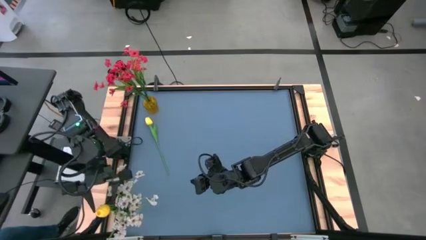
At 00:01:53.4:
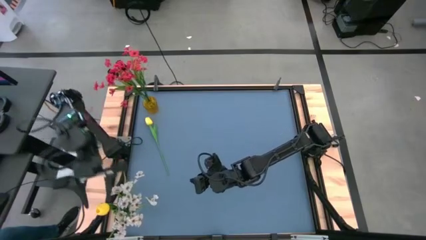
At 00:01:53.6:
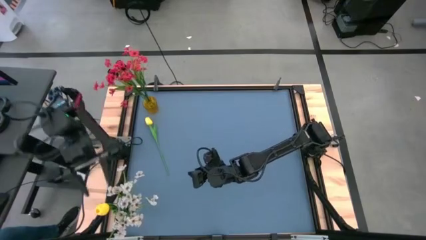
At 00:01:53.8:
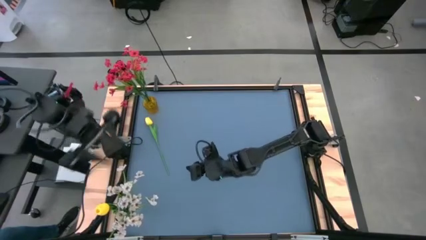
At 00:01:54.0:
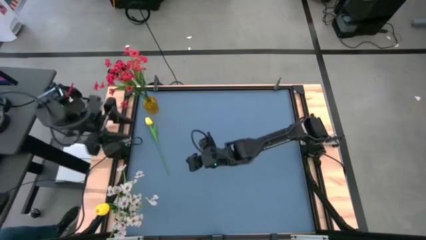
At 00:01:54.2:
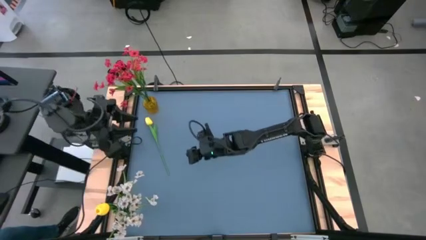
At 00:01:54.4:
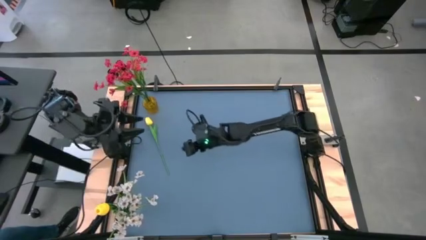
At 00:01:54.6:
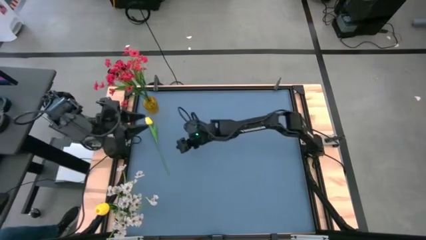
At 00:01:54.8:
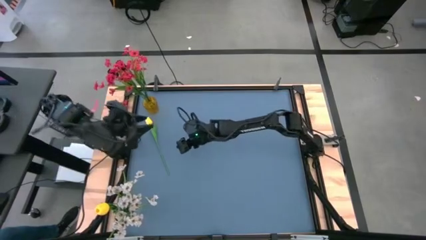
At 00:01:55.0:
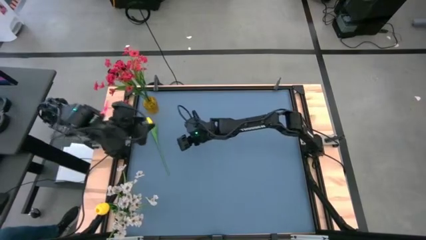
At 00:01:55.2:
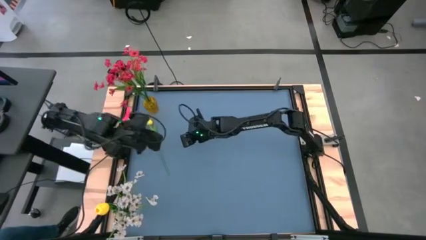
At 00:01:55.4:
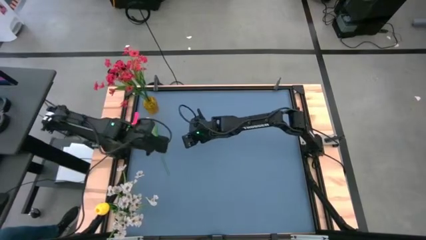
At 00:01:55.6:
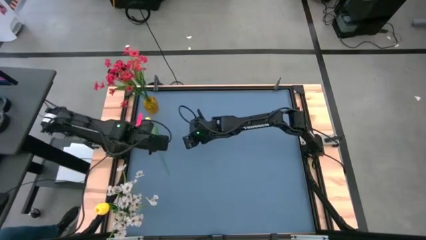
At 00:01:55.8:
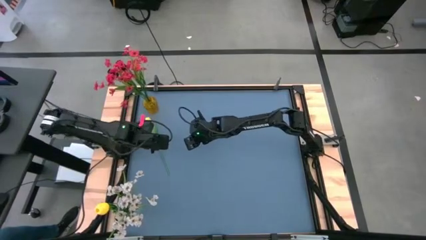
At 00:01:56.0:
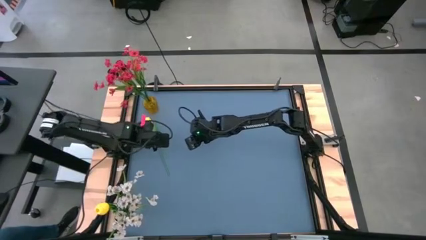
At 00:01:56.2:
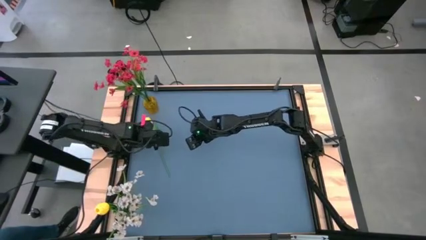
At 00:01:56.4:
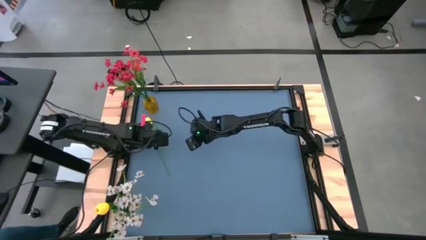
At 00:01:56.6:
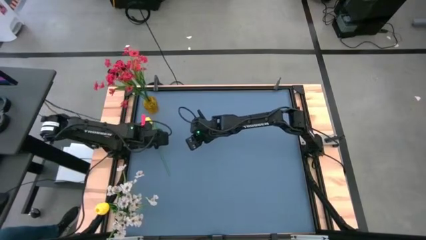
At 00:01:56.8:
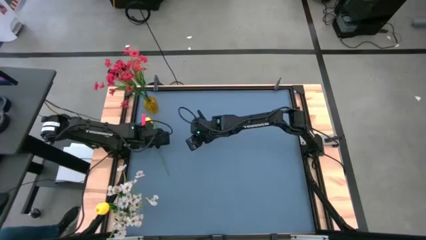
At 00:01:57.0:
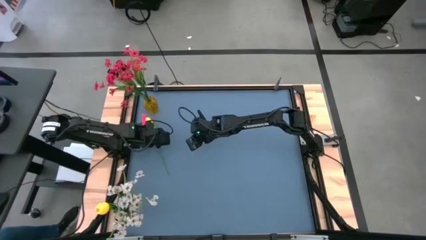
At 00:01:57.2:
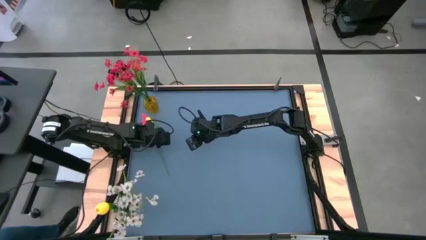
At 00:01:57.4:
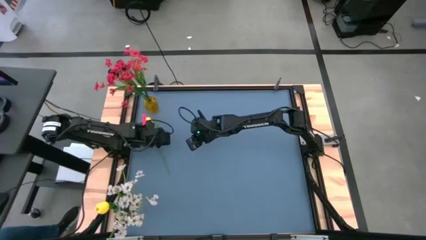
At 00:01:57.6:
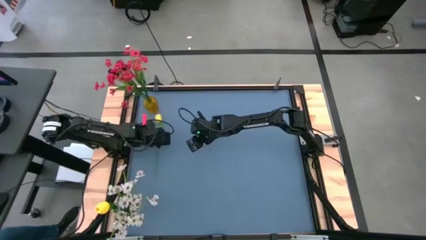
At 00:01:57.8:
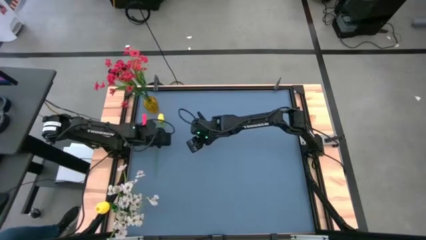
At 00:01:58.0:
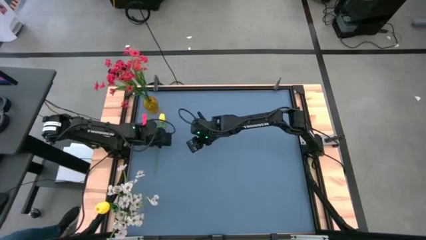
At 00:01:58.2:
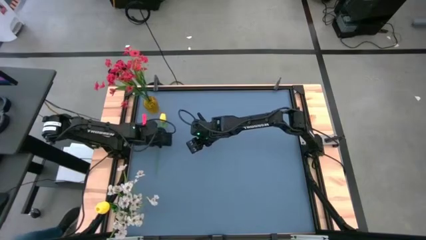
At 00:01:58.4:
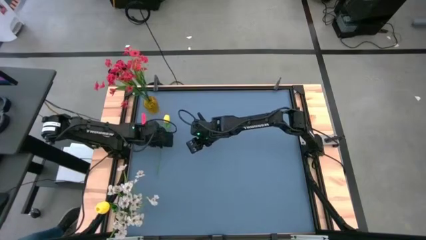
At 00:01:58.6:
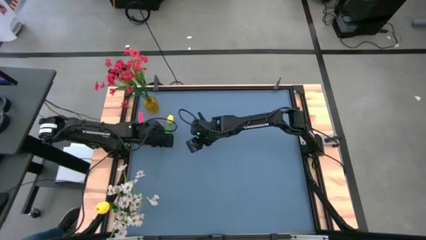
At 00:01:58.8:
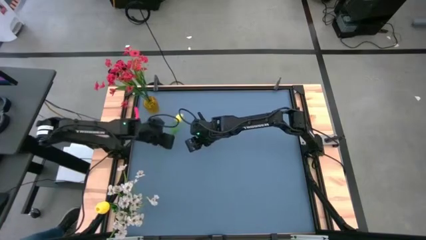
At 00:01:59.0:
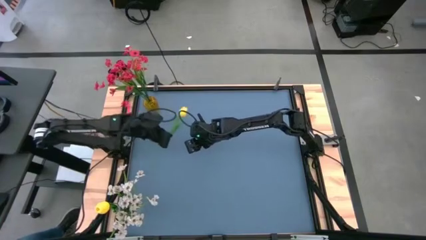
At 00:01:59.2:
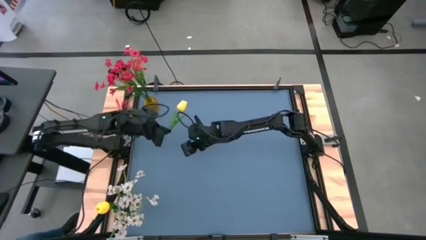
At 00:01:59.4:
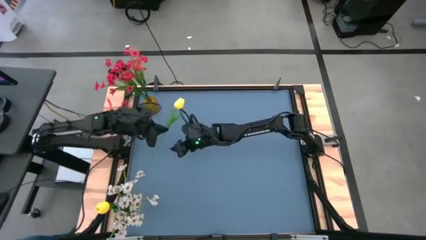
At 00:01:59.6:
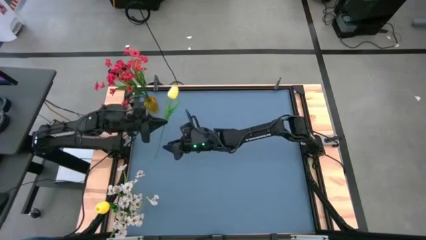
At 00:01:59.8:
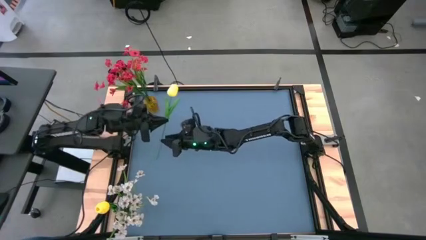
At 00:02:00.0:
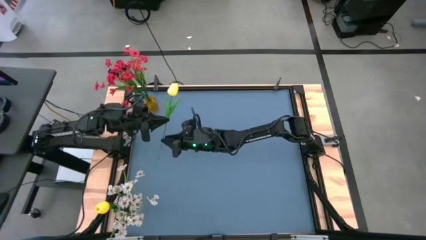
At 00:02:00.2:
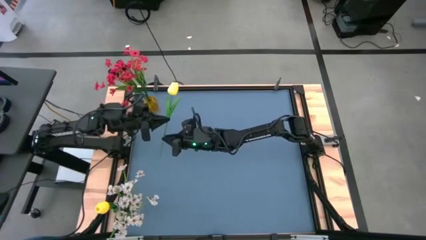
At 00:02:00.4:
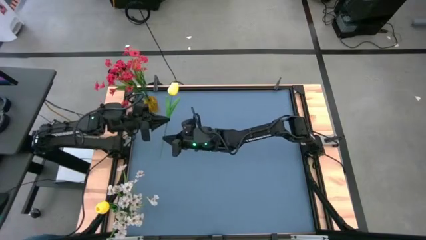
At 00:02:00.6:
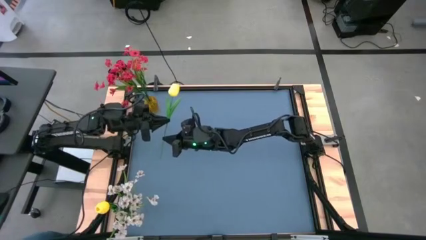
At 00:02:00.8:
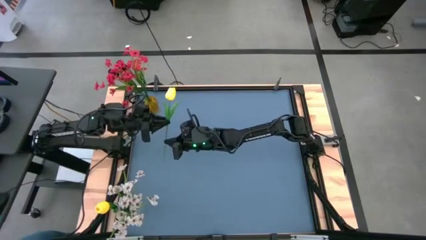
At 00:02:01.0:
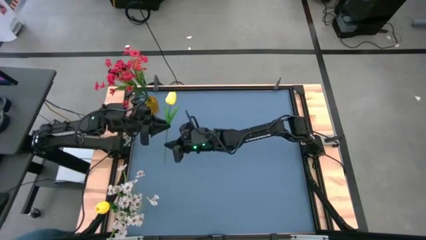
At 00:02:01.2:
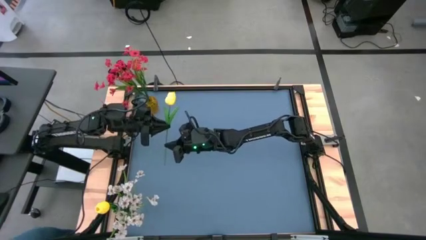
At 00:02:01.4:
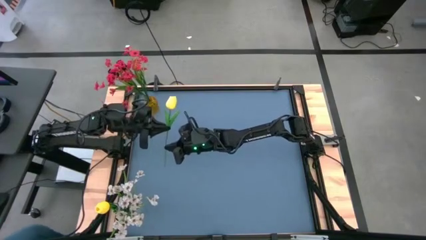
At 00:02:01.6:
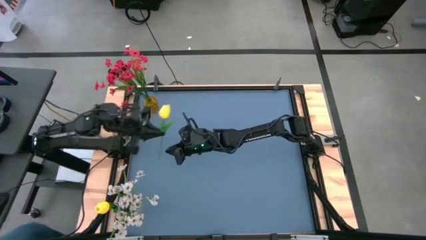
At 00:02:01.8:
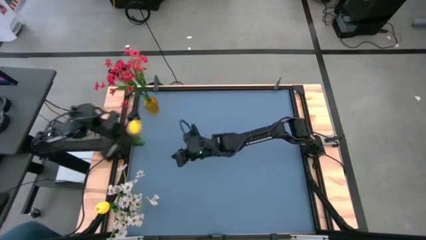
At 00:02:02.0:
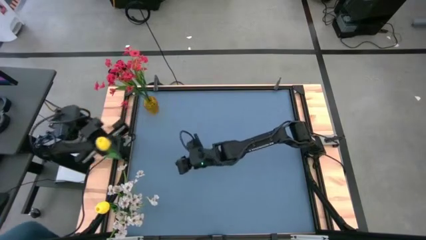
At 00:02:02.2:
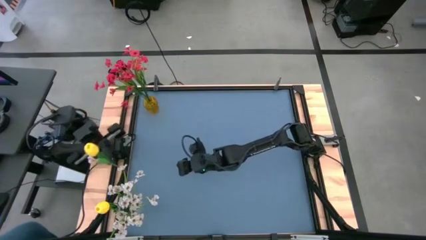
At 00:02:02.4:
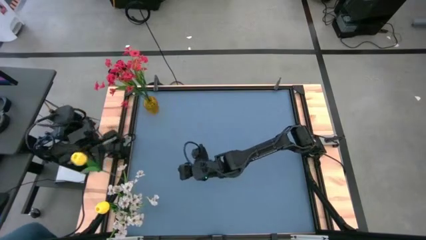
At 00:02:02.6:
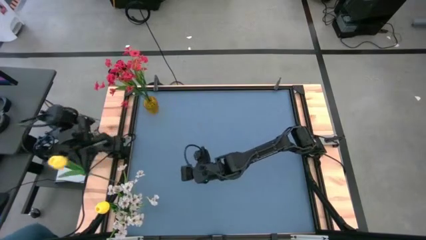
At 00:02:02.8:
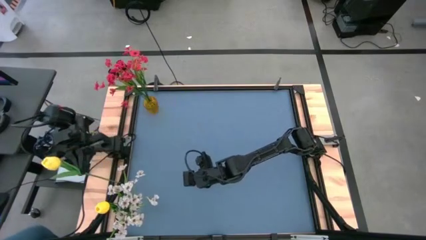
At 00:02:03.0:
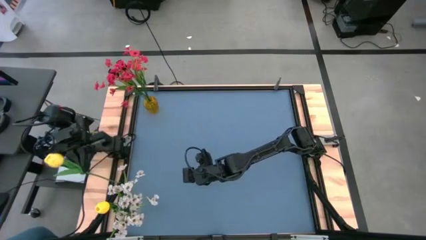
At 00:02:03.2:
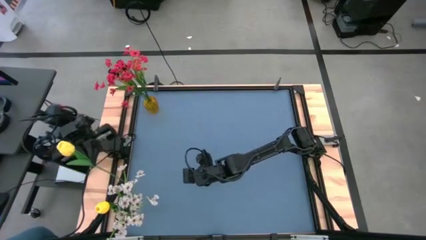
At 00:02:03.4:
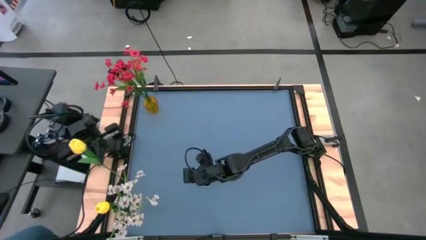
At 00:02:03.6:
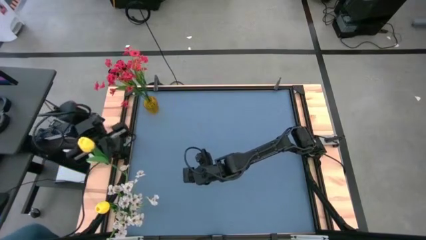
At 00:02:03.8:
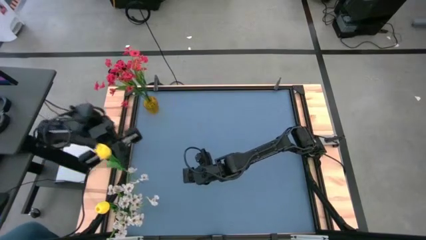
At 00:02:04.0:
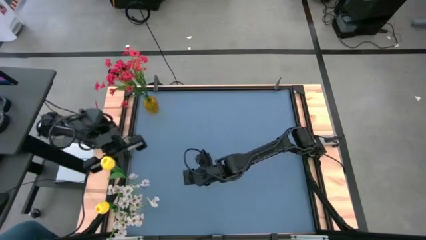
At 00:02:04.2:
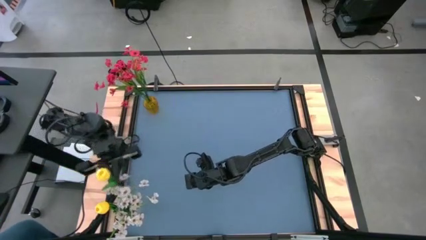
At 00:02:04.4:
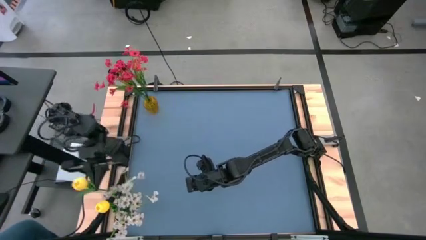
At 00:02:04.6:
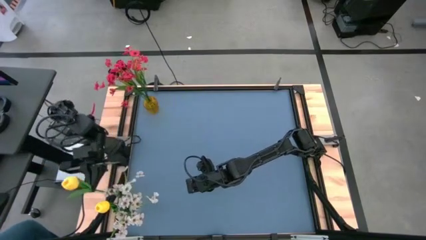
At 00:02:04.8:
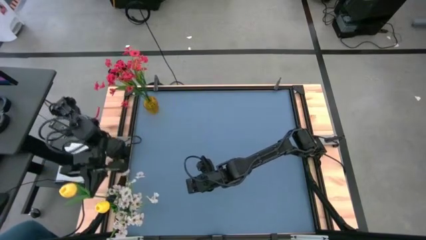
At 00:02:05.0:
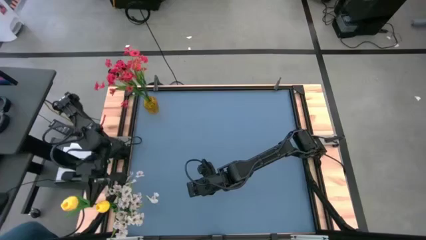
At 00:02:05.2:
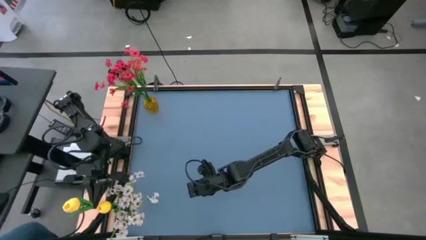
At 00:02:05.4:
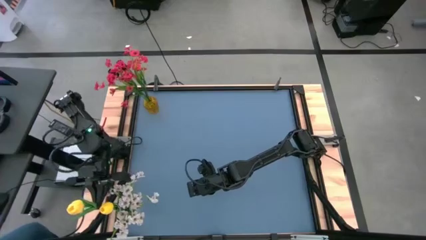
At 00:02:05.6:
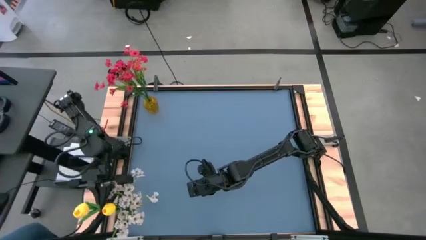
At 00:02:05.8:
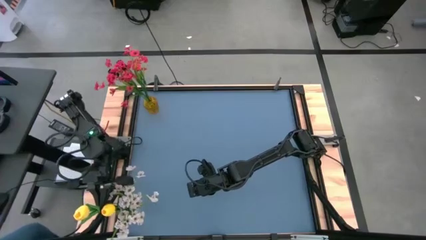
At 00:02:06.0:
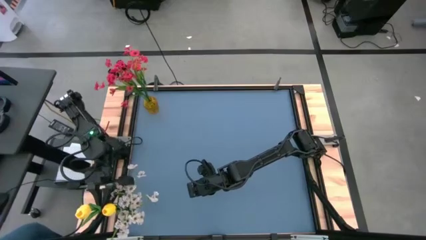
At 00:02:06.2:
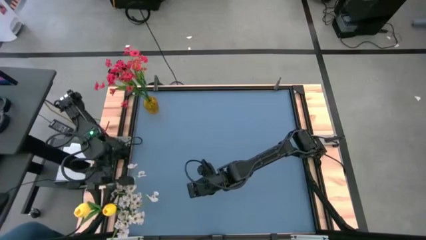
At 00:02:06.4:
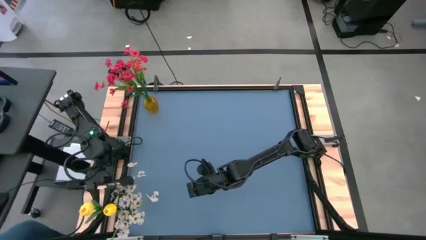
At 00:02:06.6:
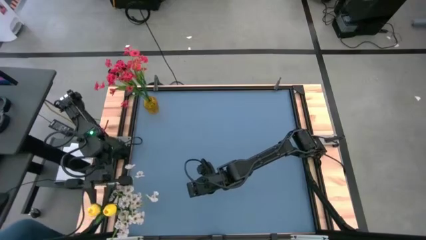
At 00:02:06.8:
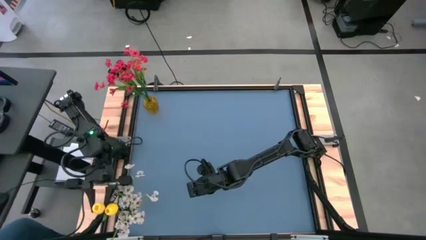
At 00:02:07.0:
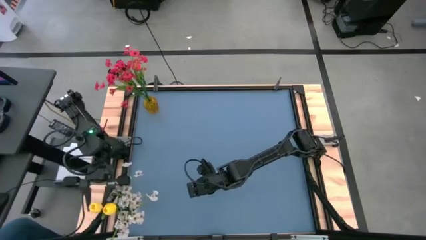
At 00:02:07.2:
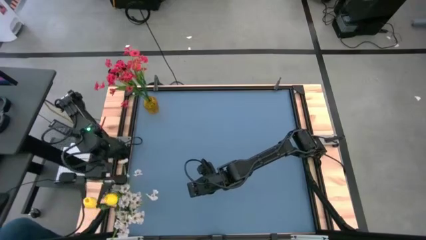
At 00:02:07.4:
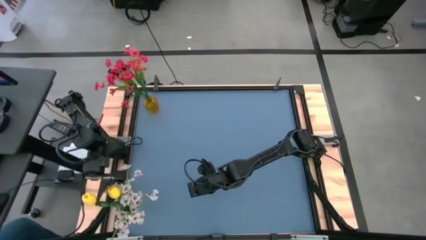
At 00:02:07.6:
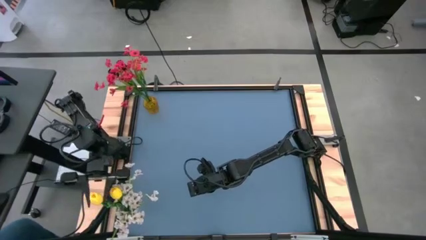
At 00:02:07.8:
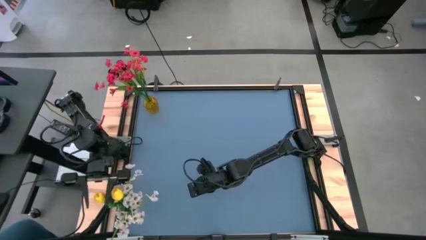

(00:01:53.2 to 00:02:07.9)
Task: Sort flowers into vase by color
Put the yellow flower into the transparent vase
